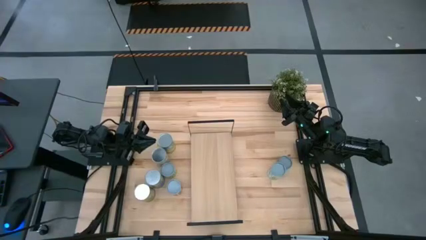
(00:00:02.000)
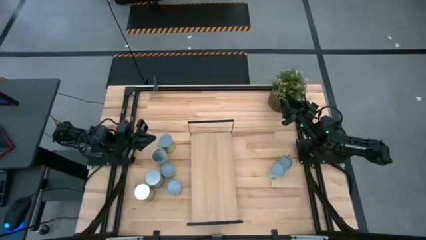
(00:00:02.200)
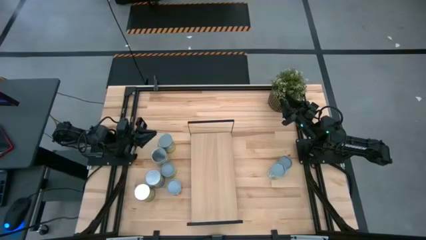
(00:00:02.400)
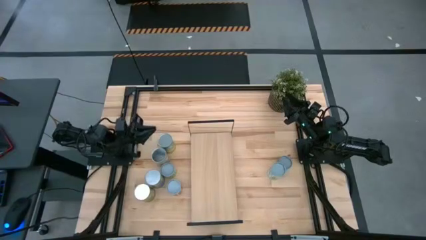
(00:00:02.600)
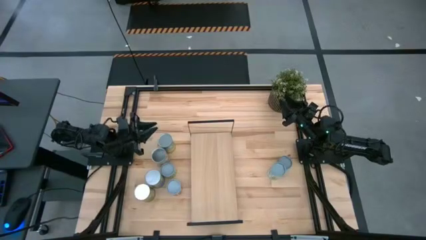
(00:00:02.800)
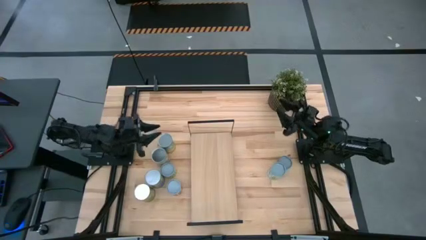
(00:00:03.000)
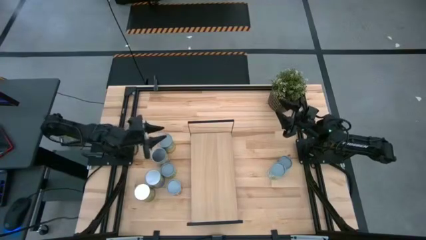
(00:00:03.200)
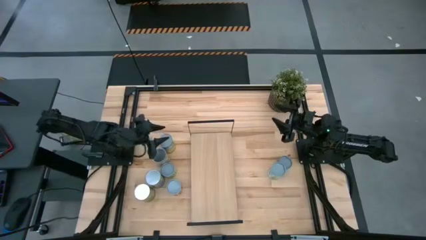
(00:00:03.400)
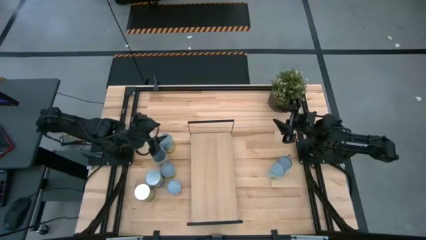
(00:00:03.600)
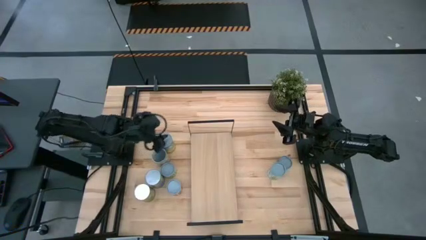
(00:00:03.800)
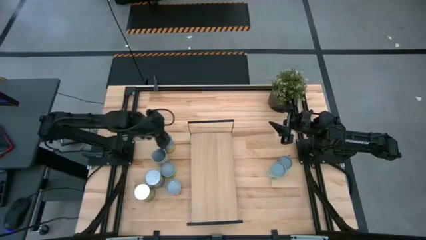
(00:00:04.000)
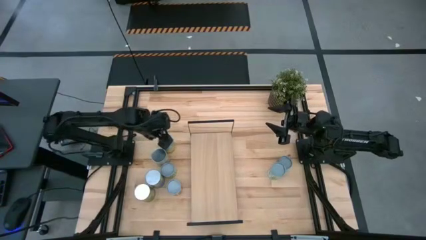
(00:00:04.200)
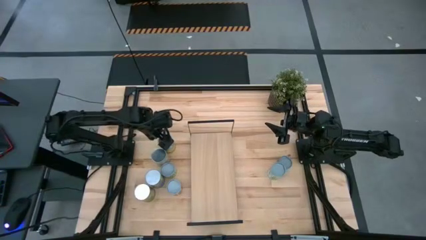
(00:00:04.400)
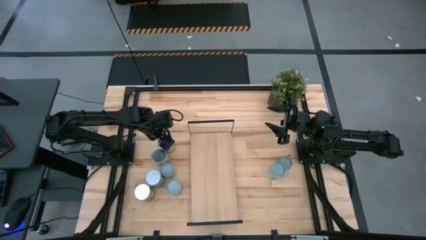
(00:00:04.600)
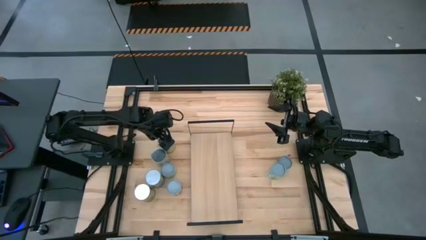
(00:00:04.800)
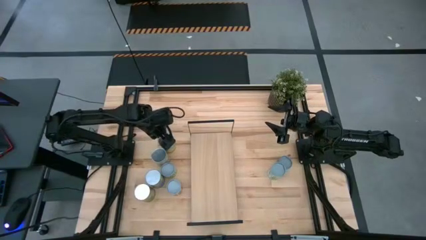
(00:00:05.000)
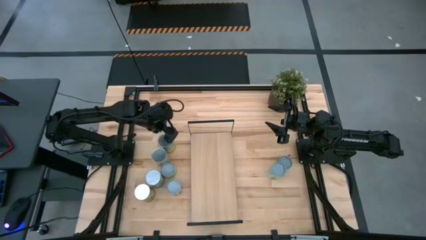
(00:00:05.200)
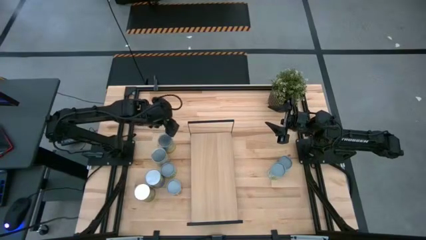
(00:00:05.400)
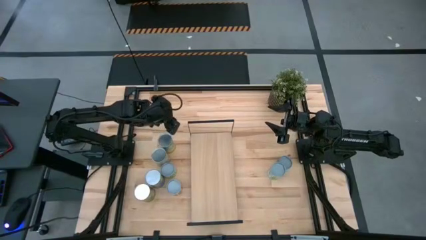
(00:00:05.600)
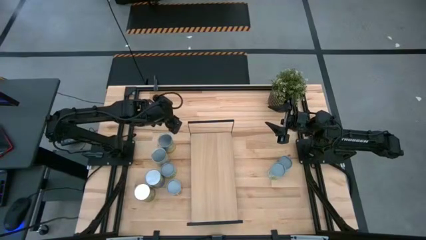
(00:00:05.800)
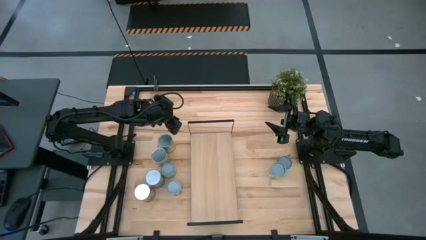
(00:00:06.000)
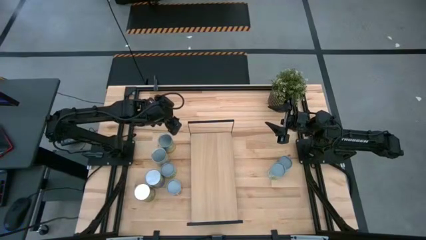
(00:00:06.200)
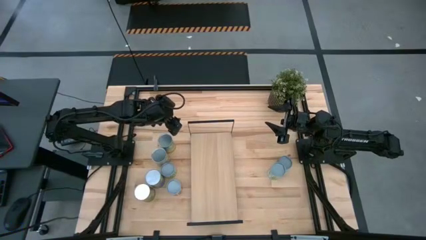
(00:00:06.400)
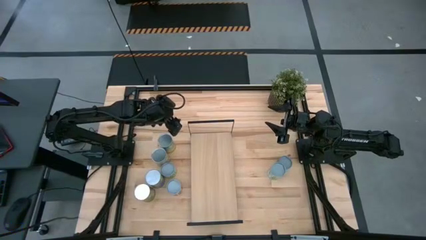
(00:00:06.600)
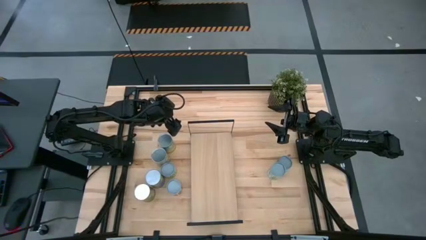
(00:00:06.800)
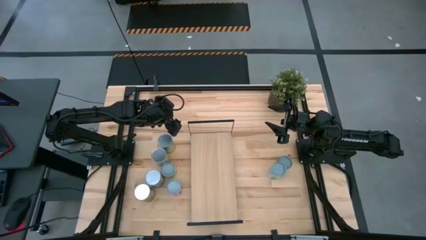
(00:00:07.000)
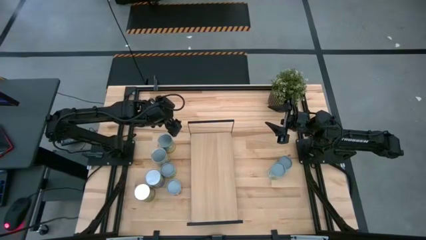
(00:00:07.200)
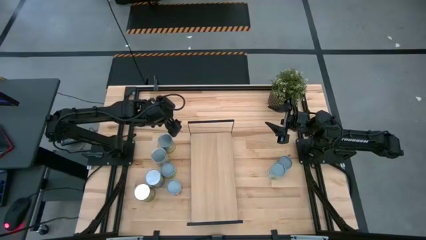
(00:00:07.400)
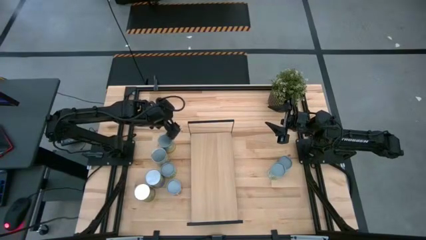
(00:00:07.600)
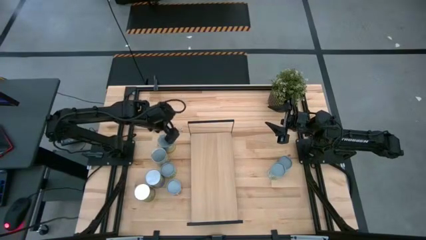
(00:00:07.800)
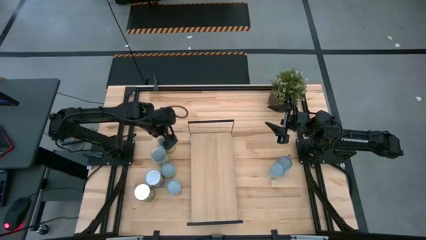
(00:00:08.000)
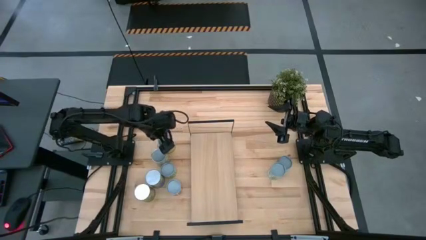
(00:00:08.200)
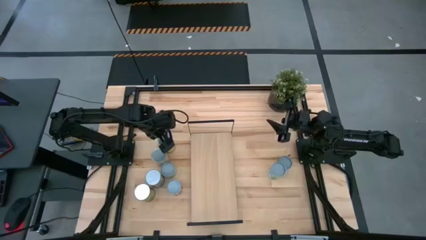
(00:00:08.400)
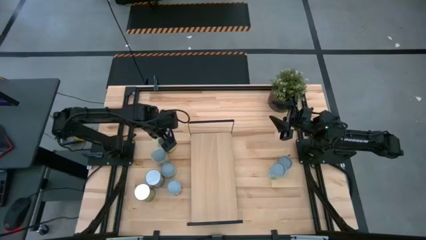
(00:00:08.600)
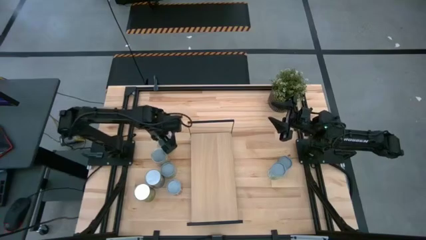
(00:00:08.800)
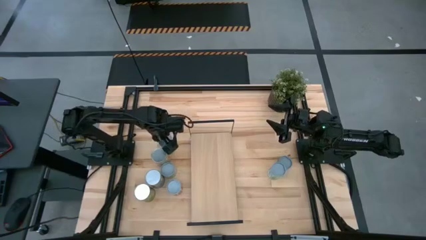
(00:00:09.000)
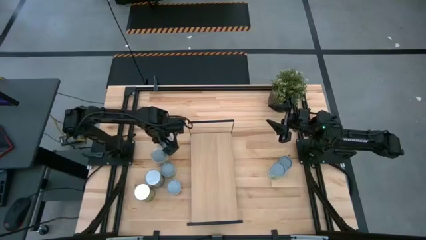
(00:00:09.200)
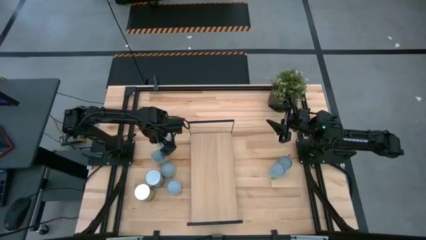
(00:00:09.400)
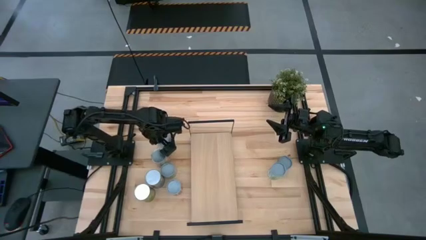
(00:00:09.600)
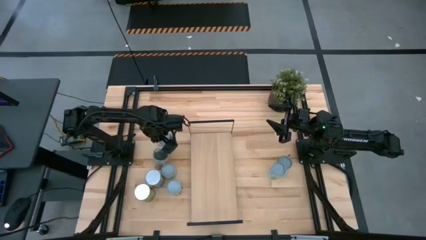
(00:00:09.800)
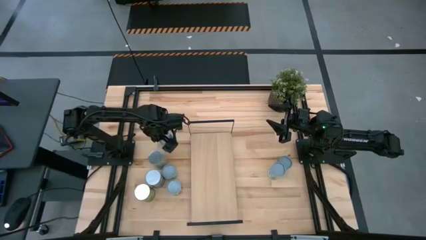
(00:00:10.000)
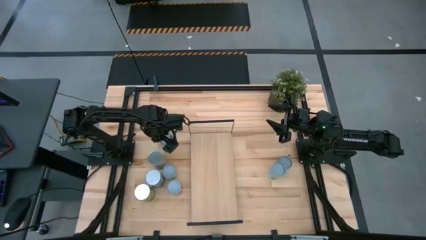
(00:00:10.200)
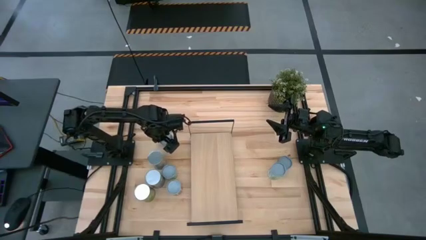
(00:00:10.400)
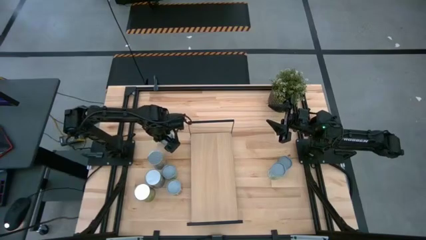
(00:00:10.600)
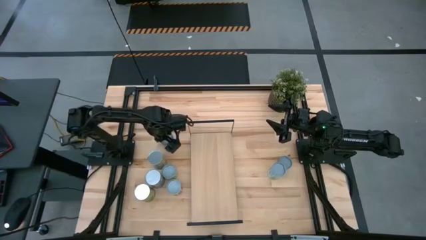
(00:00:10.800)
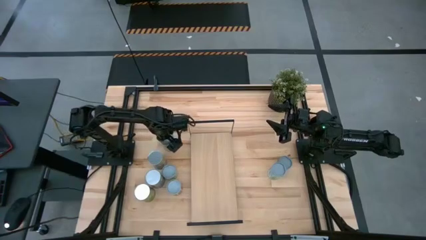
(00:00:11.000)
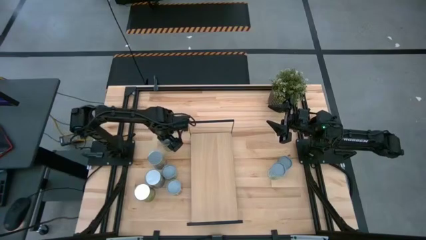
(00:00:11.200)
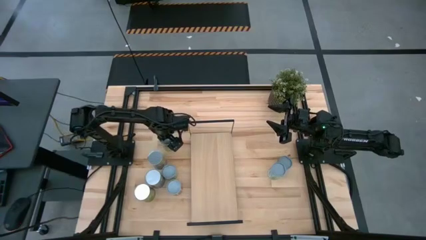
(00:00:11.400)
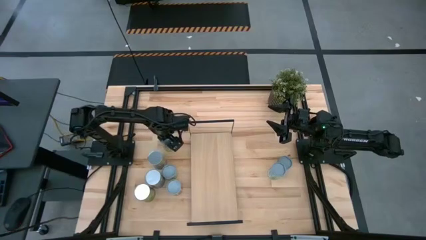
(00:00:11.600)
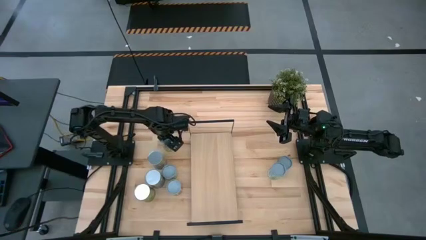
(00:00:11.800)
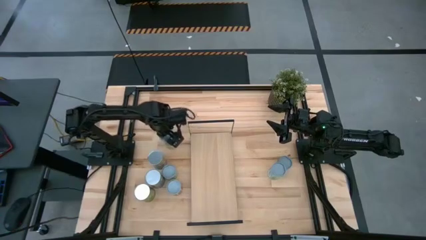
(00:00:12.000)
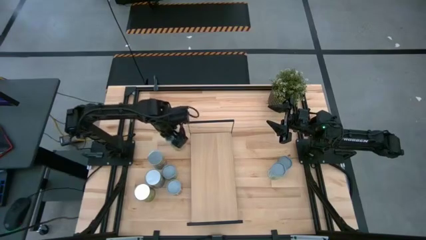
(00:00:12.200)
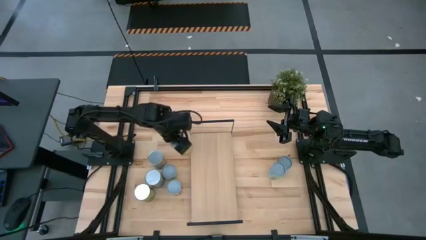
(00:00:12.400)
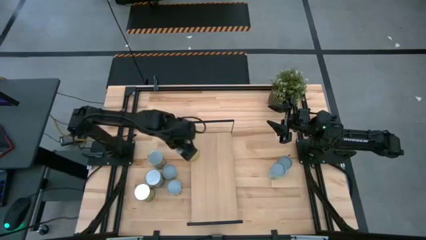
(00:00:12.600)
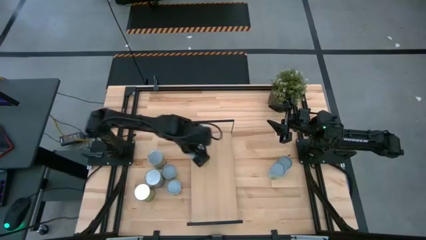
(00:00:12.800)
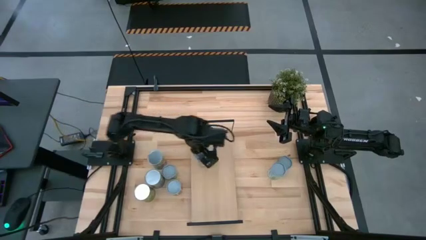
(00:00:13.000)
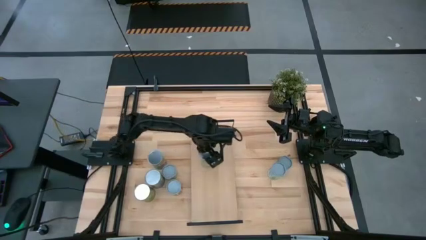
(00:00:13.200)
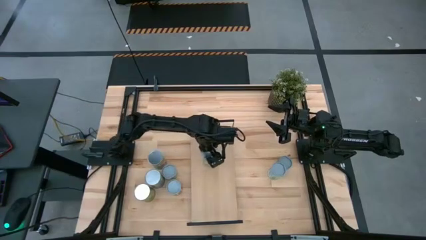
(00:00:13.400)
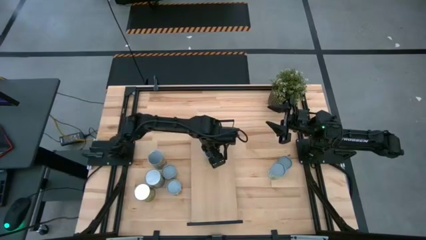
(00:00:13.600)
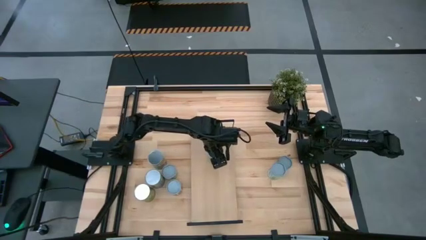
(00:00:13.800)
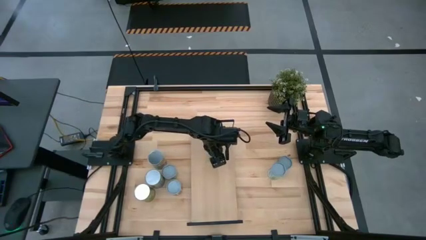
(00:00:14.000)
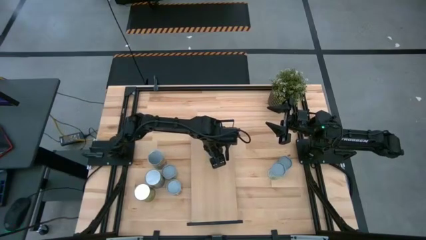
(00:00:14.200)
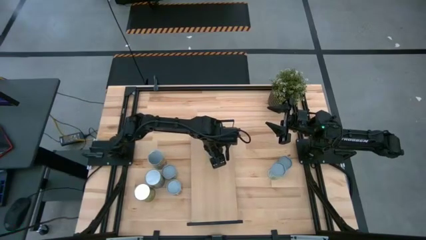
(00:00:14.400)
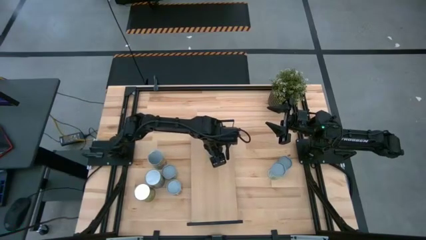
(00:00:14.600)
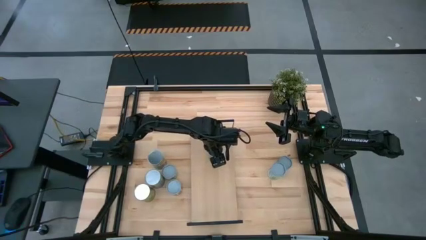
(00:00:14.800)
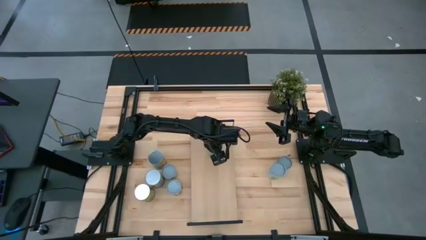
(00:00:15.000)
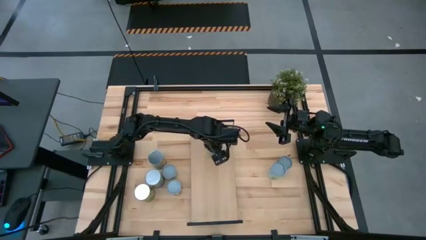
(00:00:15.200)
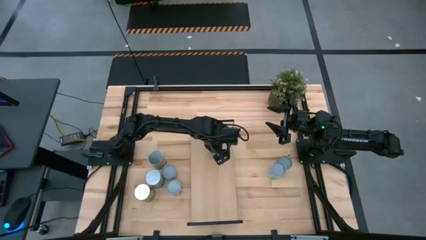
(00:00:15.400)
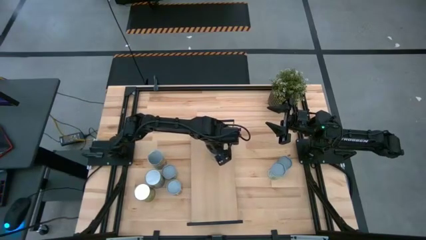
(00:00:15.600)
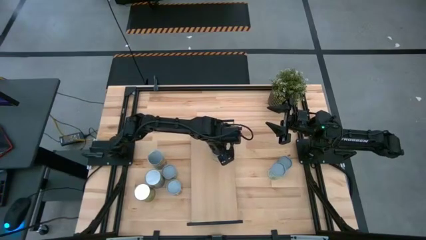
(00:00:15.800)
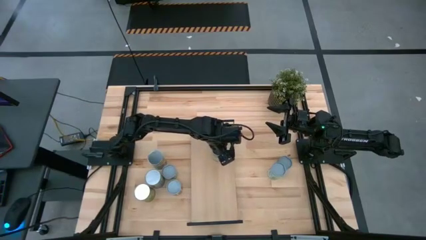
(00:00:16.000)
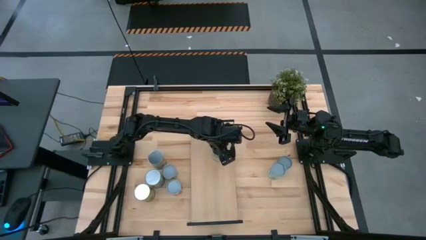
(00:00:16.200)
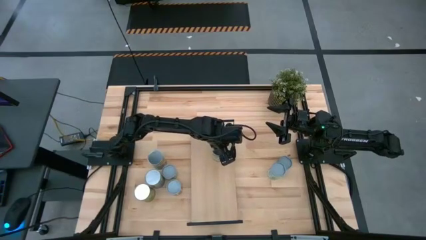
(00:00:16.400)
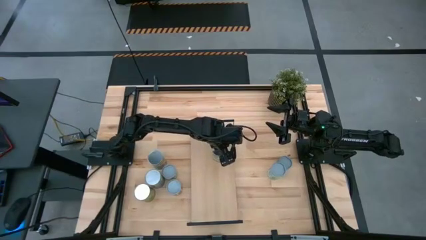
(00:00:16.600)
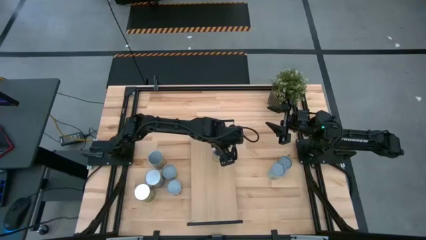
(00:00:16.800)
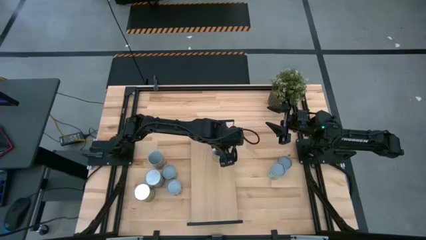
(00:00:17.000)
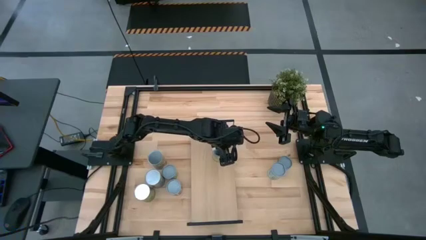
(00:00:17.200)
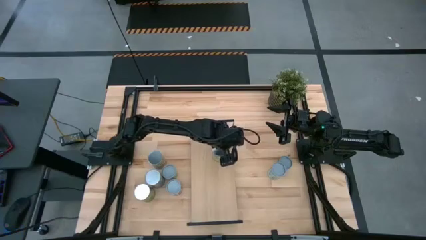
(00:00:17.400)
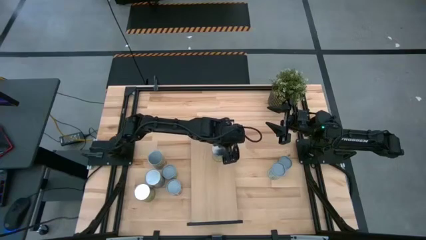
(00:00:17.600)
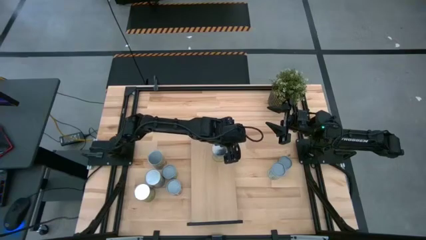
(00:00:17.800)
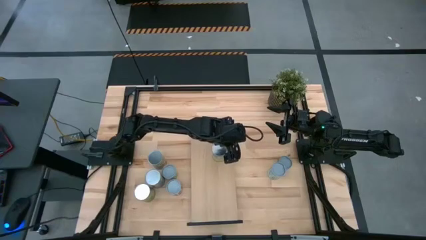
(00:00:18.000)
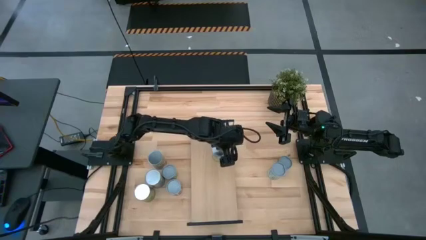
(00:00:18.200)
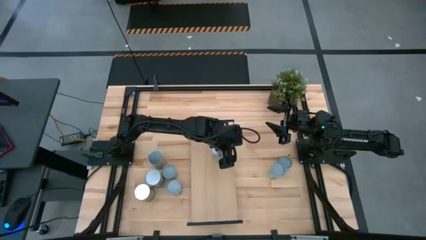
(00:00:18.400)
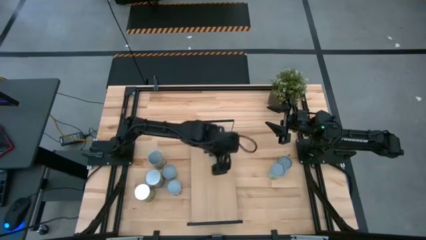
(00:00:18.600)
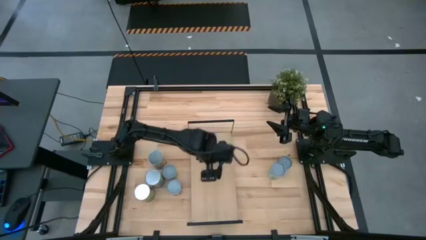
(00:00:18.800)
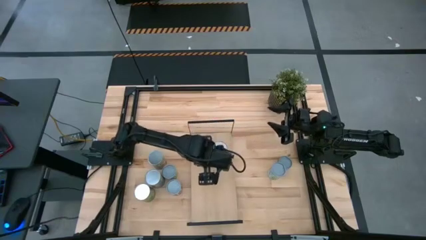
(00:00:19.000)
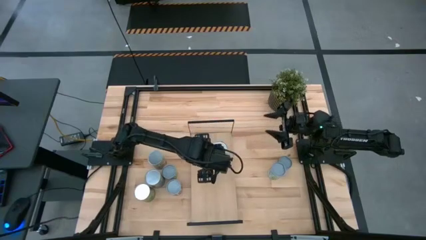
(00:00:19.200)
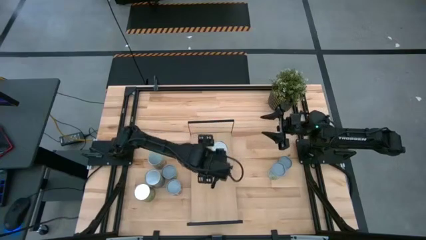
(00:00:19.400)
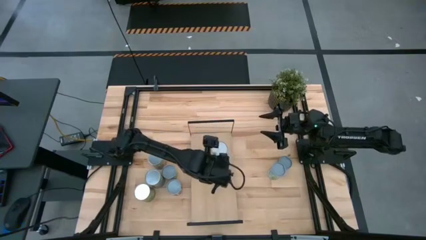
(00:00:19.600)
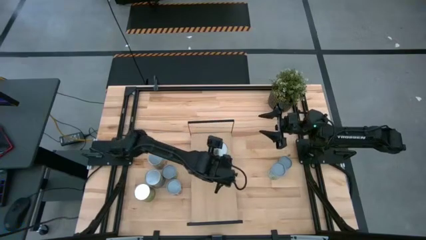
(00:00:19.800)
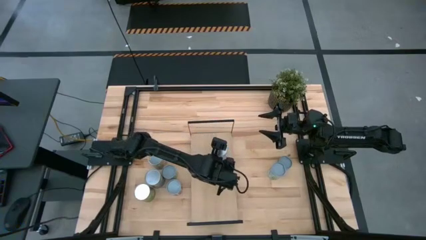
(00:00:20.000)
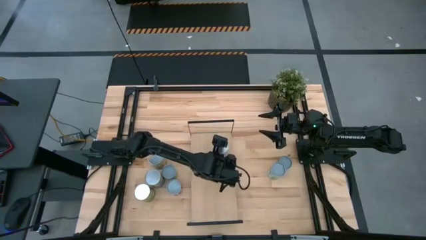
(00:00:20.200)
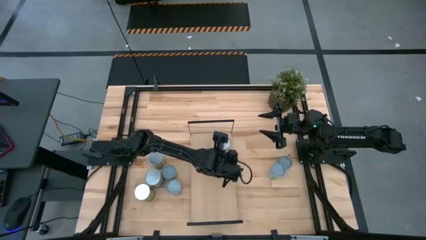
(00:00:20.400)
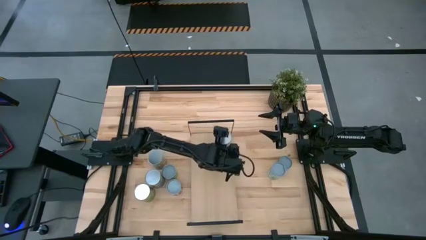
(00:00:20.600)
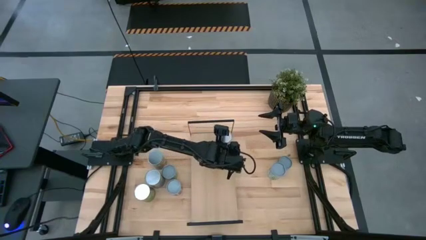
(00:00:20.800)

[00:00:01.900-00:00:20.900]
Task: Pick and place cans onto a shelf
Put the large canned carrots on the shelf
